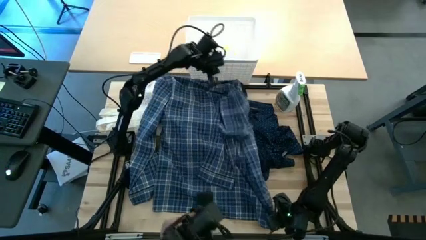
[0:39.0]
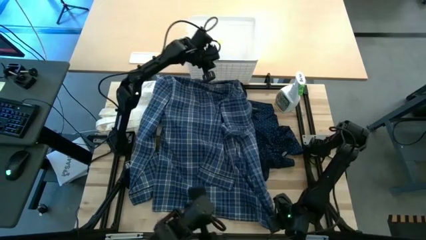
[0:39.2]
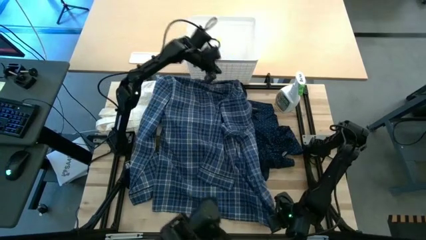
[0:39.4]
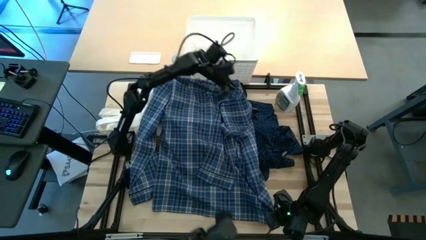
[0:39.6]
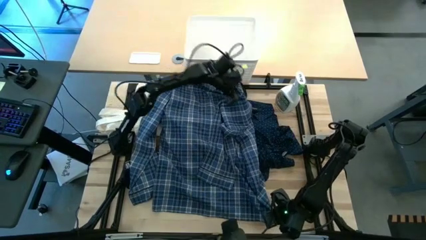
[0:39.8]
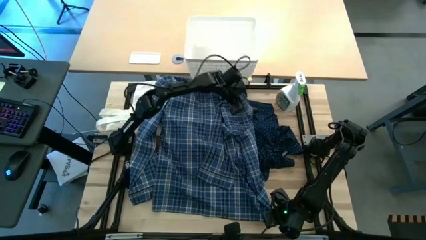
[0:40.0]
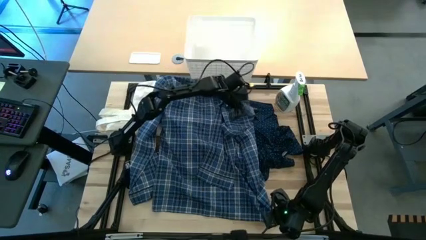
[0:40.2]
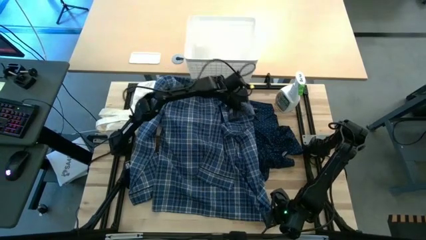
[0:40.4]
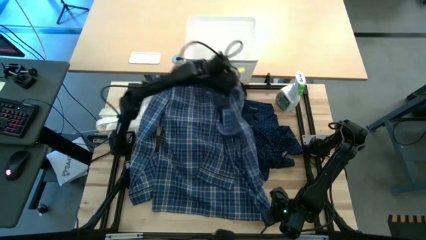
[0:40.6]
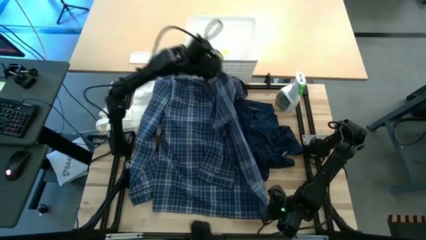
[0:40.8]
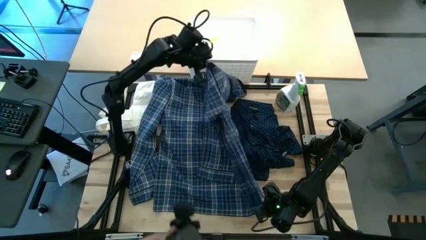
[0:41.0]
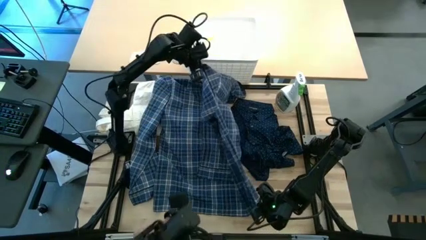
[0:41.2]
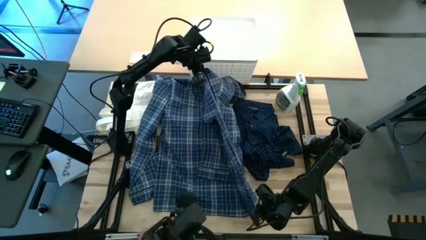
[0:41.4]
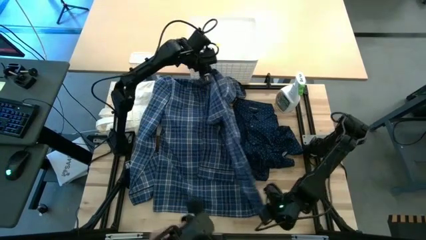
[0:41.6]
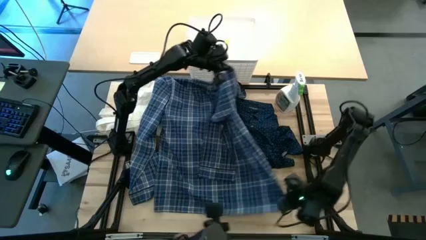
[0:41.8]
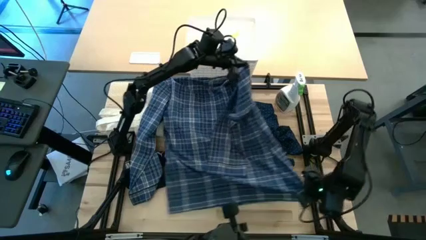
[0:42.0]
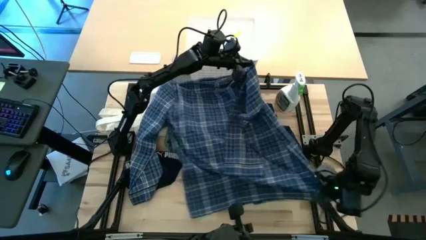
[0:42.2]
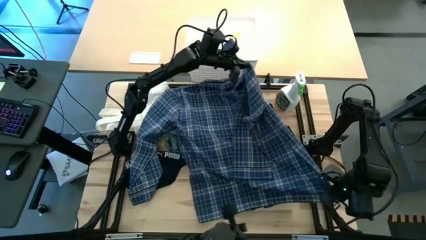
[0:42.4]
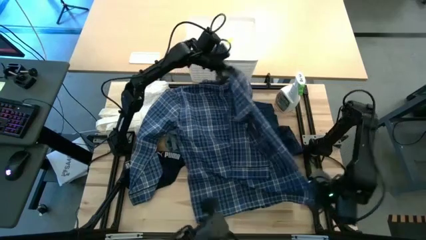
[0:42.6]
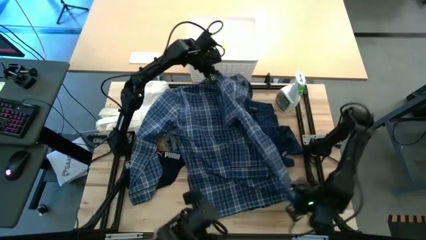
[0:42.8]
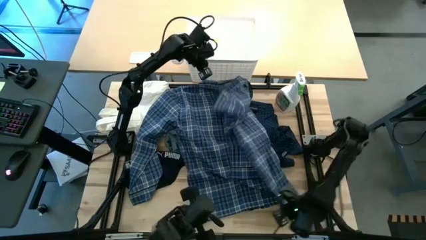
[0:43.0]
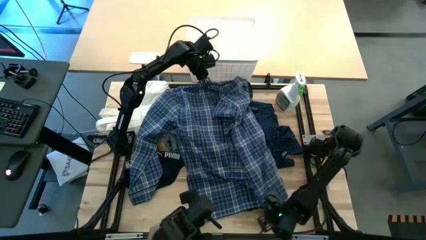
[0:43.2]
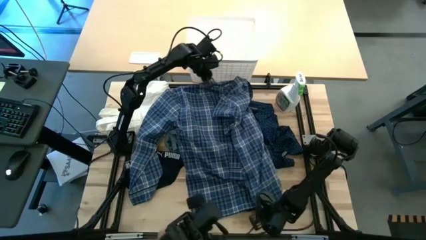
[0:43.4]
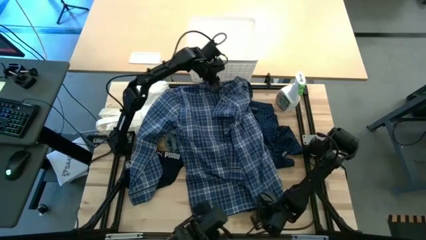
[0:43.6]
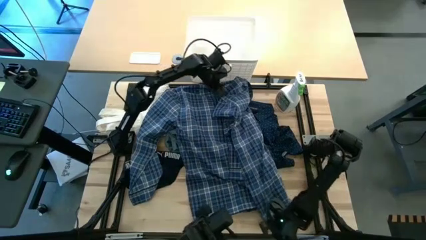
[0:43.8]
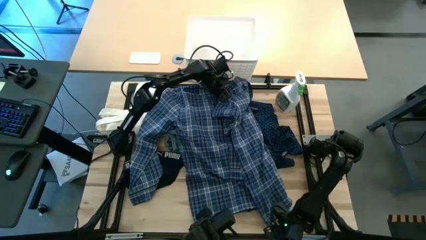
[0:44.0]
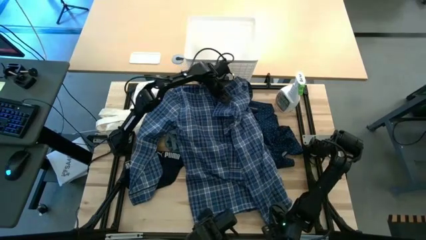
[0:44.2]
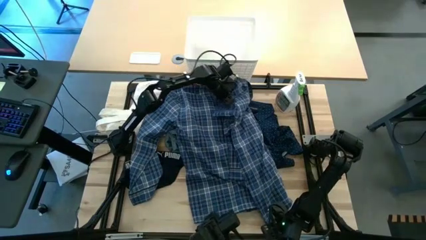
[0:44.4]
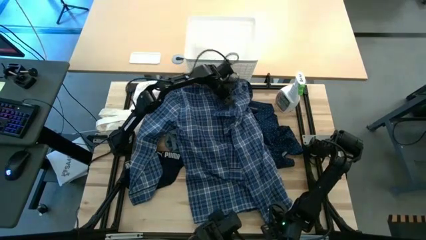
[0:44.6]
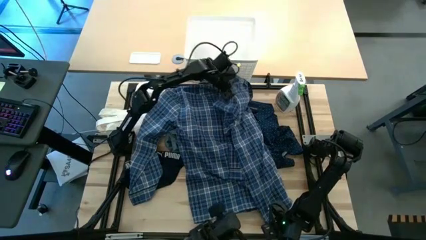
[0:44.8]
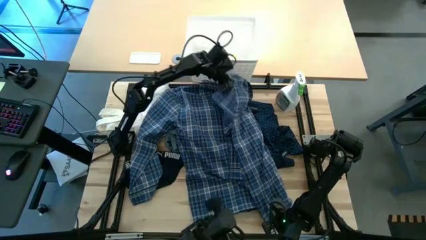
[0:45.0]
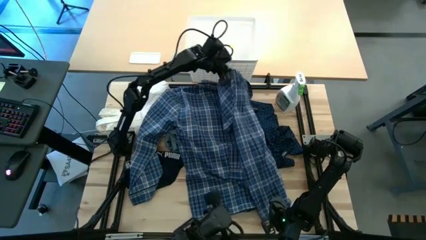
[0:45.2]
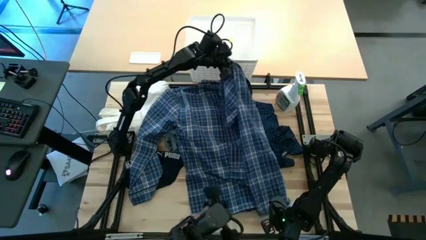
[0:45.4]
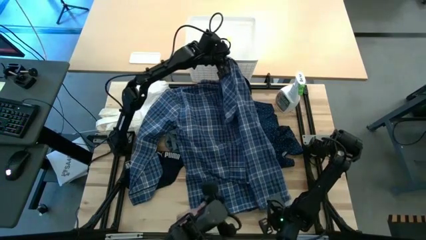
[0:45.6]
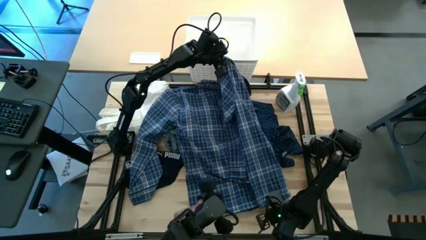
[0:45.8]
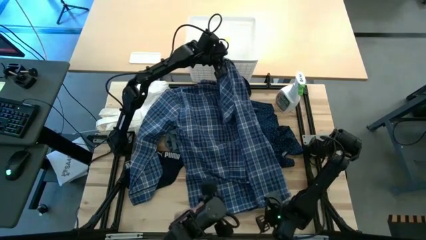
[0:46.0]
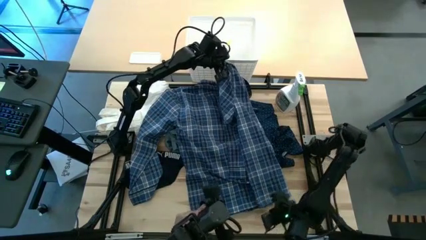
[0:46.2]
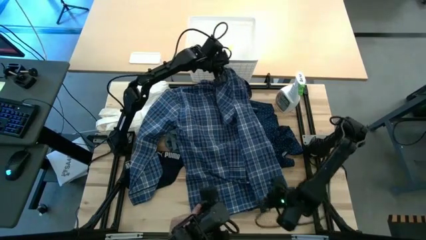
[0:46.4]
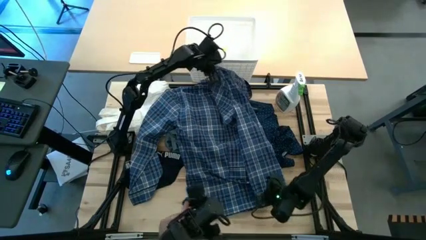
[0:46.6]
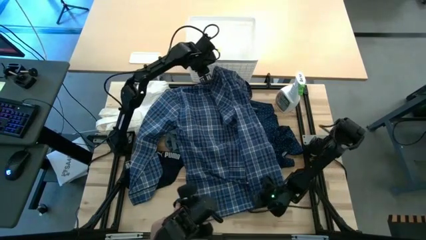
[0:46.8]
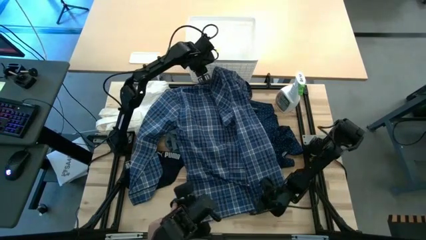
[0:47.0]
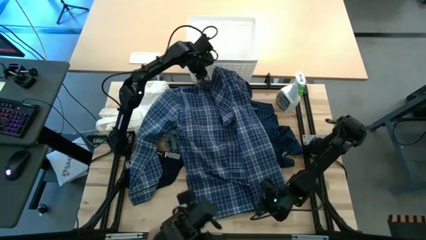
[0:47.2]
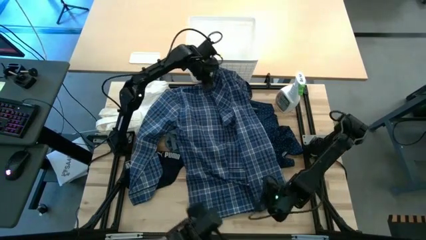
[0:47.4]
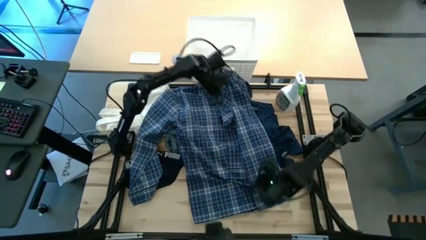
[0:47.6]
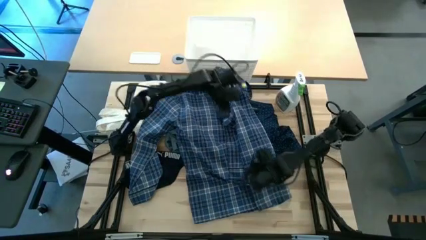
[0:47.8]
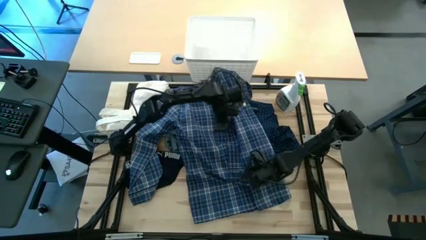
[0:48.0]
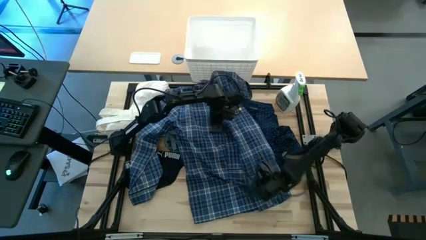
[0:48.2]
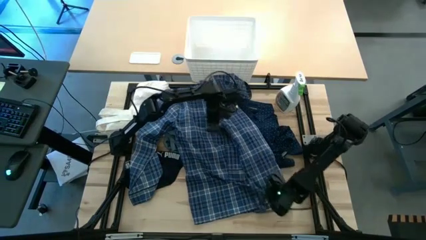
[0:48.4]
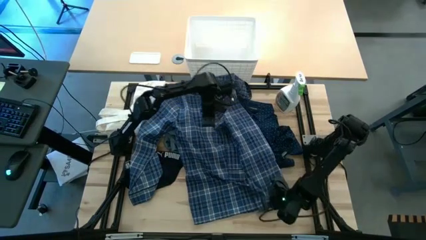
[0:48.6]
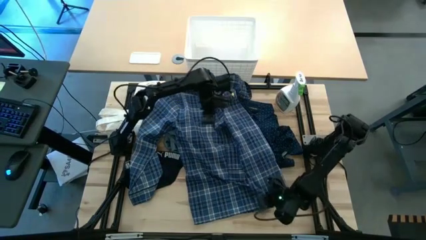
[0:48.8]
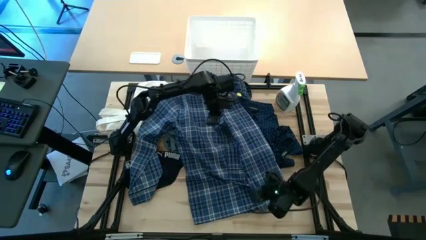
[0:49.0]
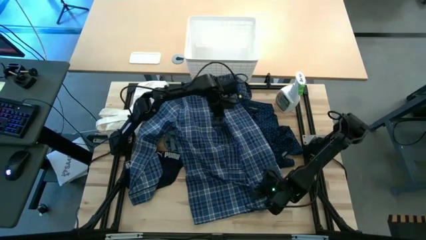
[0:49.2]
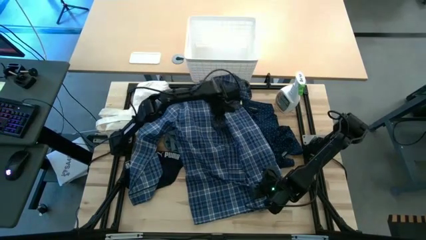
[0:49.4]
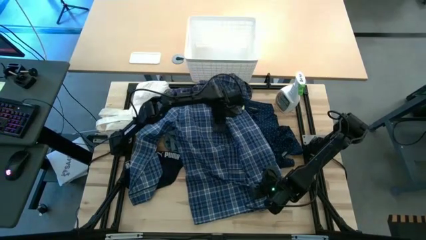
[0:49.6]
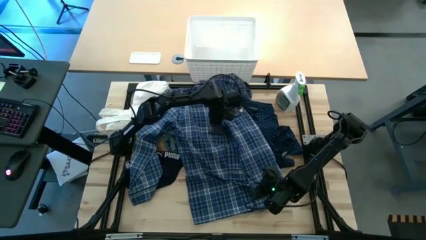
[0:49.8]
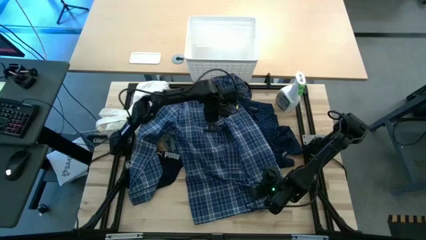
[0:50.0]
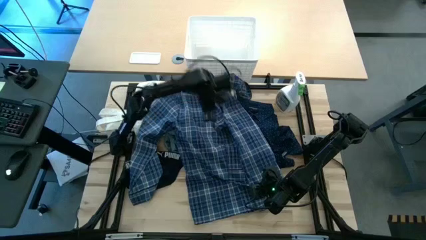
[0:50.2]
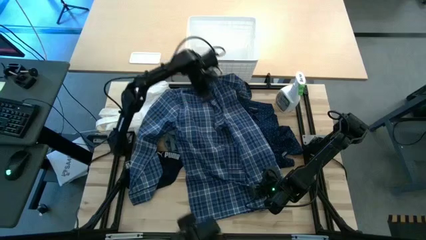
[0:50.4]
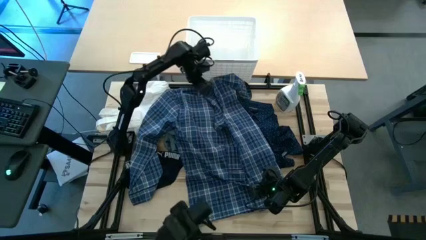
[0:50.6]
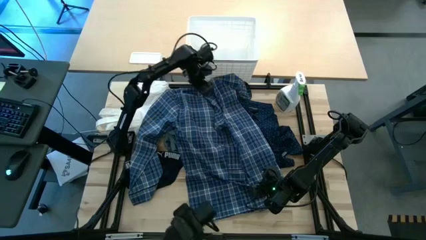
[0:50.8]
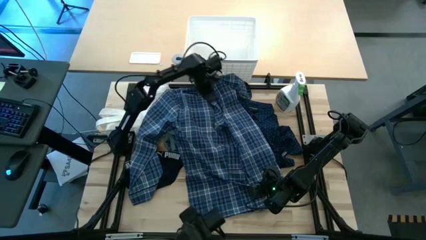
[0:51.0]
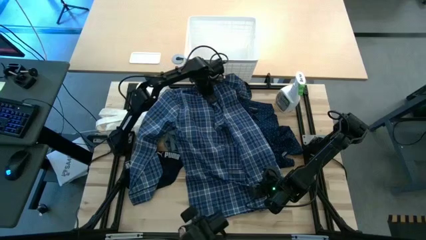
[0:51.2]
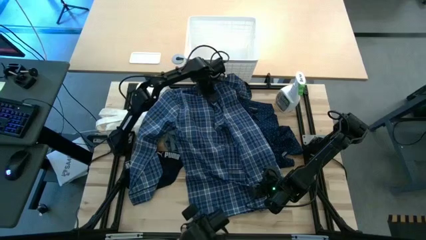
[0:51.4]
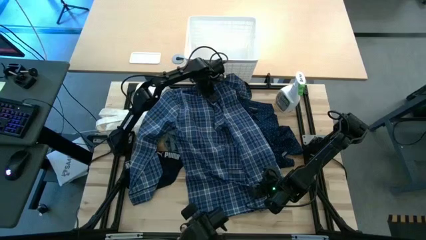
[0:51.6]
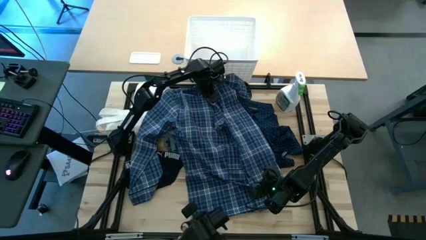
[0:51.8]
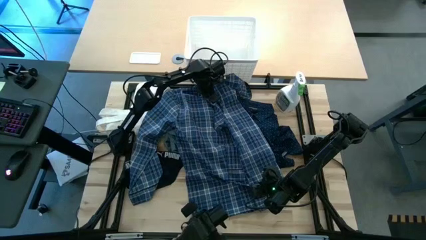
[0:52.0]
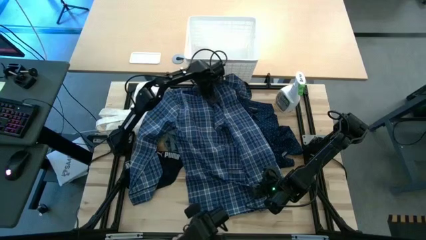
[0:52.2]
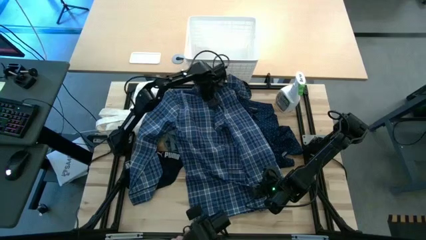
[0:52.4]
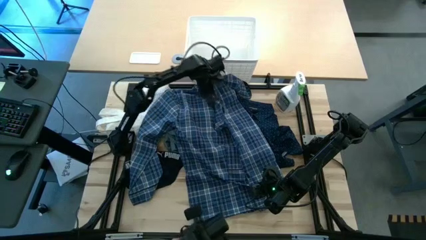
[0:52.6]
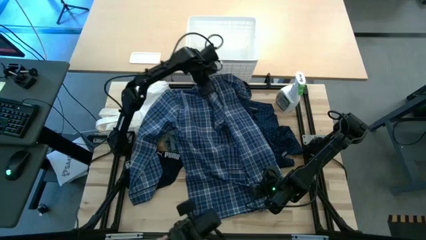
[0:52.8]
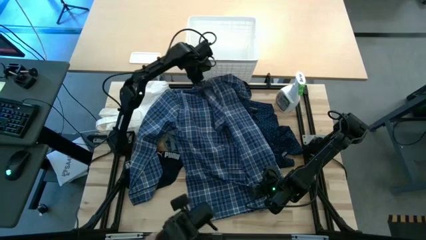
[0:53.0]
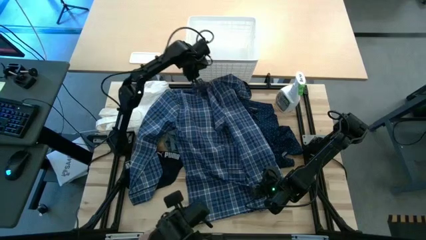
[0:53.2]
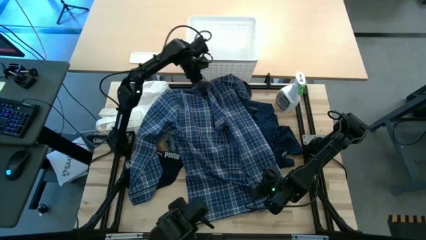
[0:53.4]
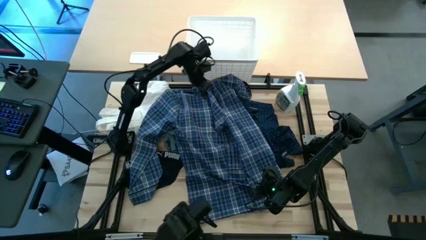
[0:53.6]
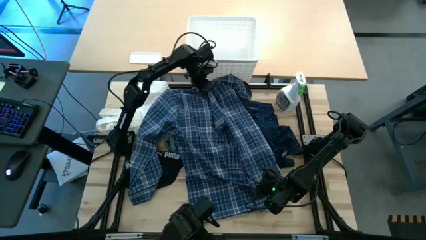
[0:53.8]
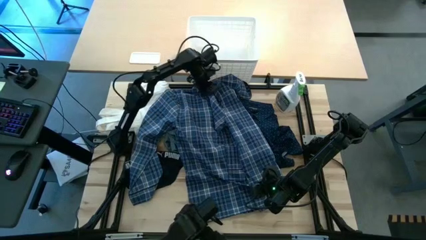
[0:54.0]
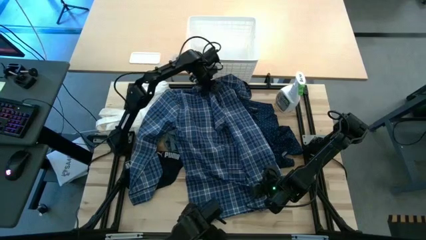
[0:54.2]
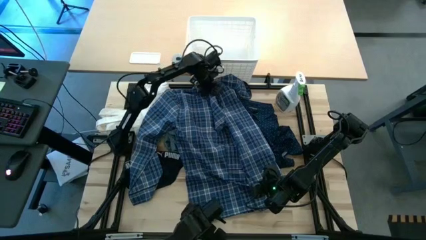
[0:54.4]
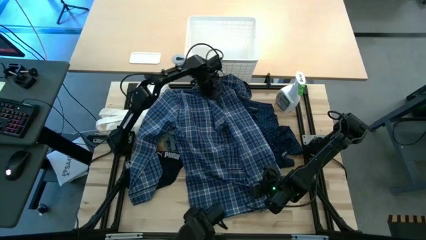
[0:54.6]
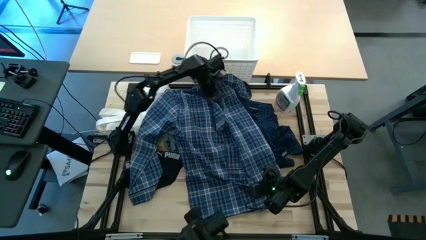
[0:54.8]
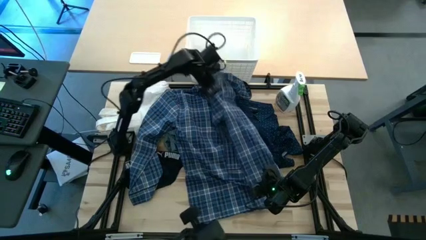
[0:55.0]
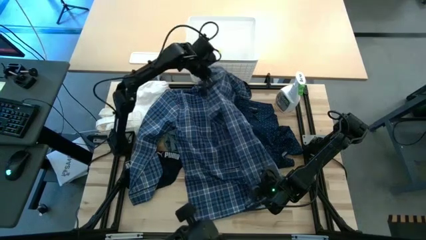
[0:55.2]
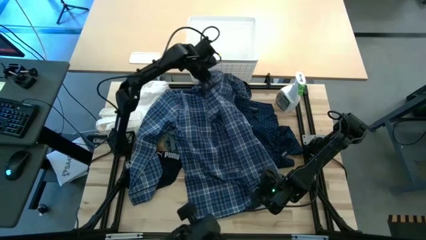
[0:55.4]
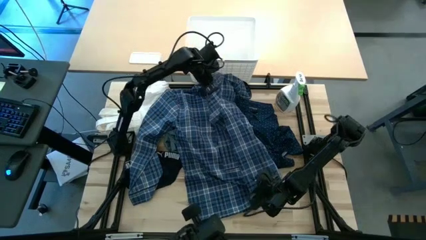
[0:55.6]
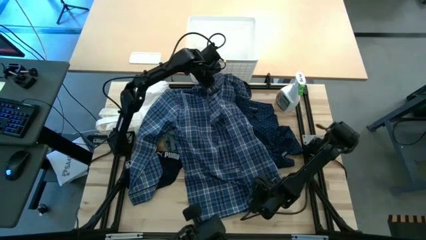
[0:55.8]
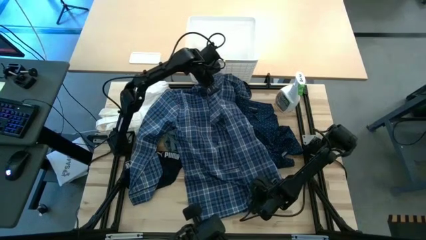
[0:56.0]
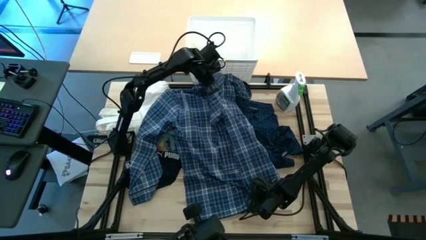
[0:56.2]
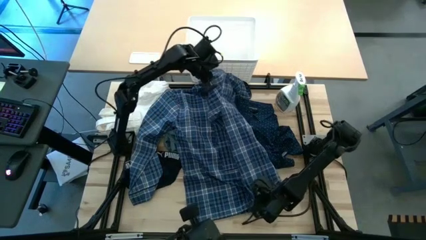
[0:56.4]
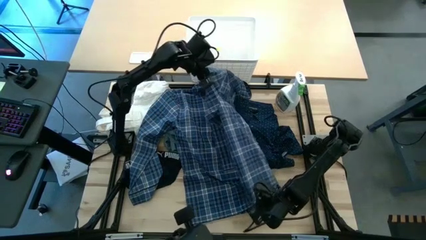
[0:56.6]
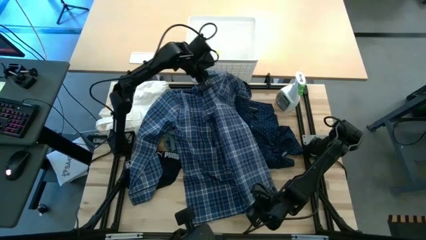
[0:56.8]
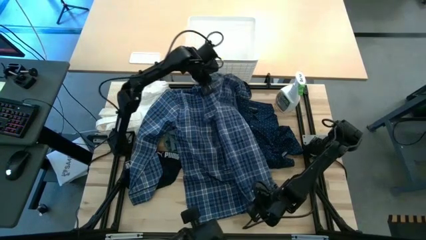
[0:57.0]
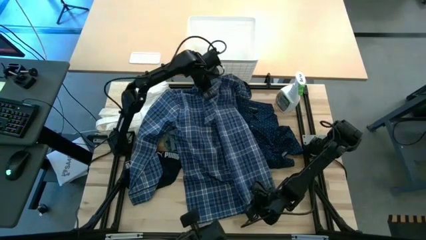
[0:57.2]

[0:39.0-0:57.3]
Fold the checkered blue polo
